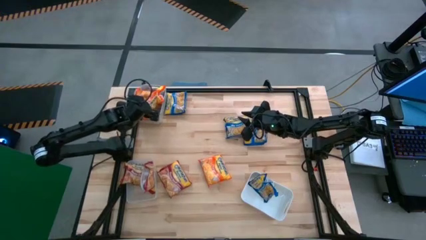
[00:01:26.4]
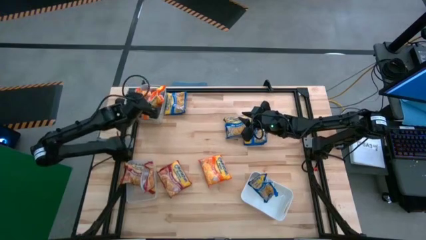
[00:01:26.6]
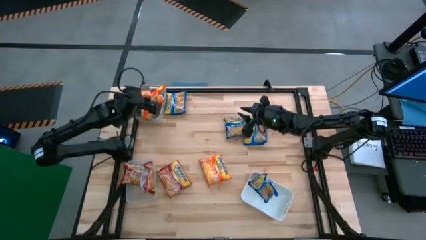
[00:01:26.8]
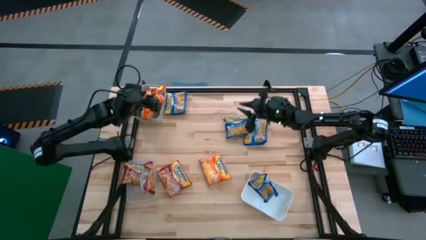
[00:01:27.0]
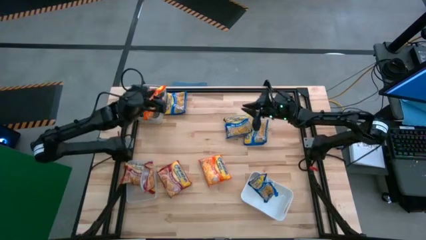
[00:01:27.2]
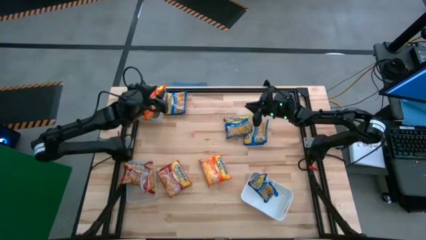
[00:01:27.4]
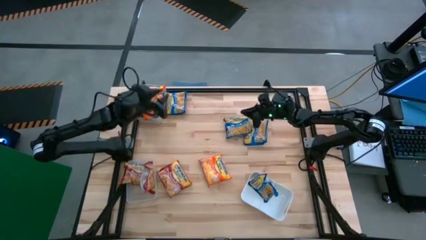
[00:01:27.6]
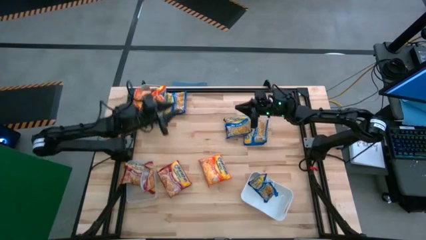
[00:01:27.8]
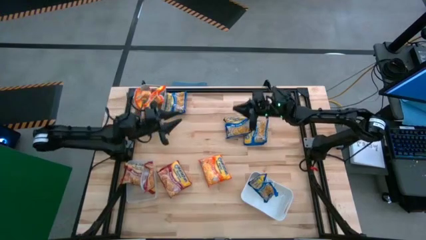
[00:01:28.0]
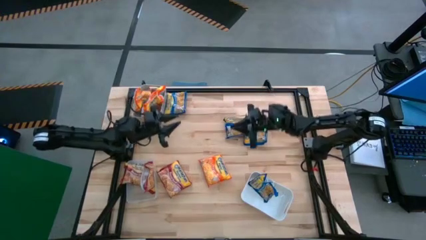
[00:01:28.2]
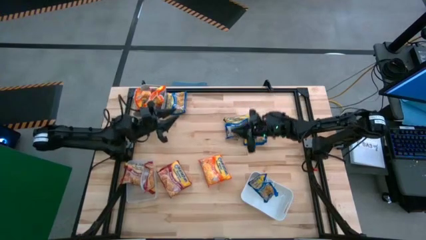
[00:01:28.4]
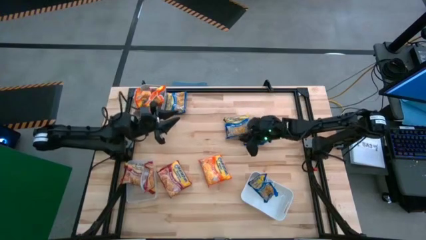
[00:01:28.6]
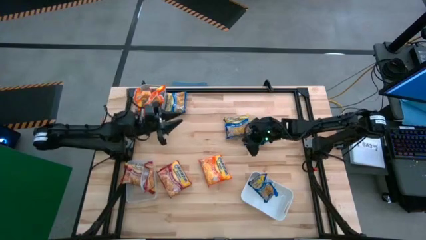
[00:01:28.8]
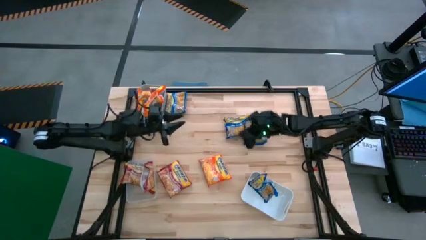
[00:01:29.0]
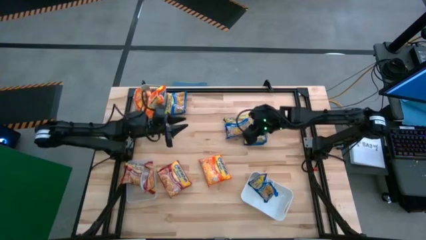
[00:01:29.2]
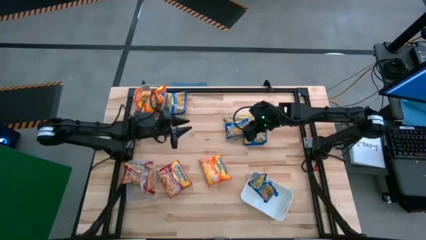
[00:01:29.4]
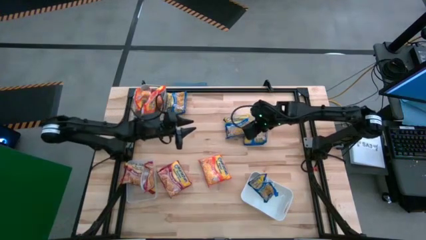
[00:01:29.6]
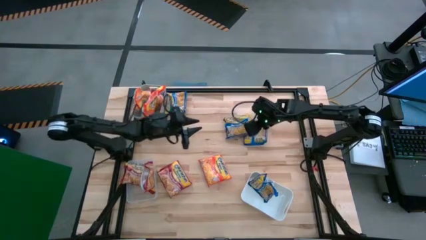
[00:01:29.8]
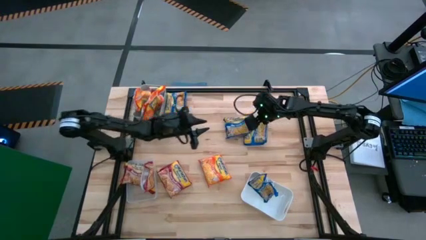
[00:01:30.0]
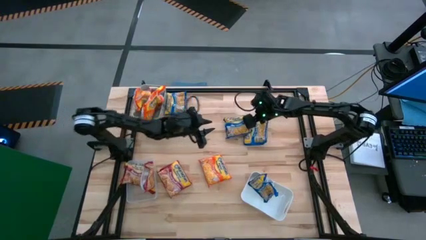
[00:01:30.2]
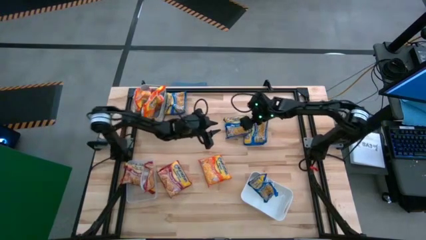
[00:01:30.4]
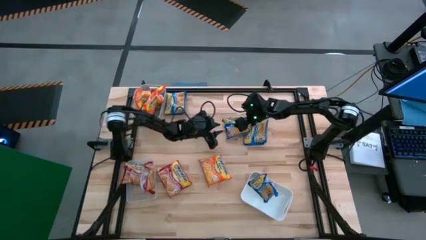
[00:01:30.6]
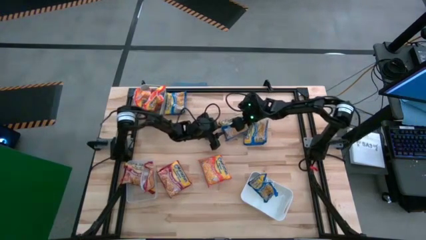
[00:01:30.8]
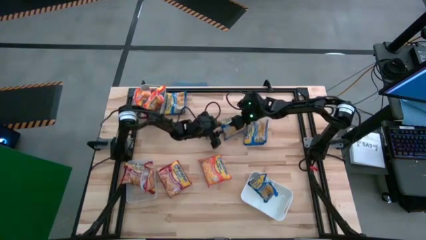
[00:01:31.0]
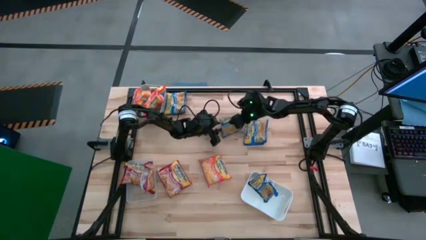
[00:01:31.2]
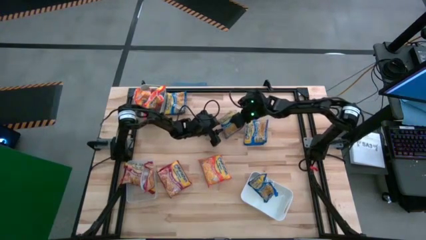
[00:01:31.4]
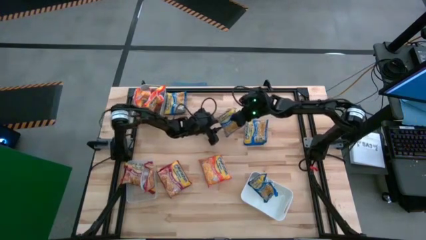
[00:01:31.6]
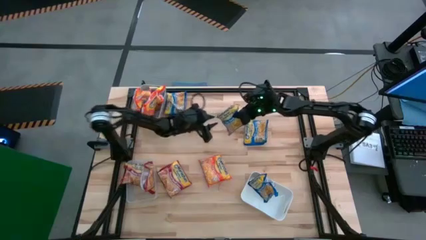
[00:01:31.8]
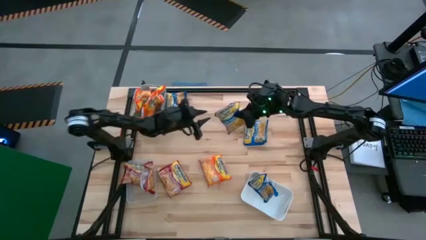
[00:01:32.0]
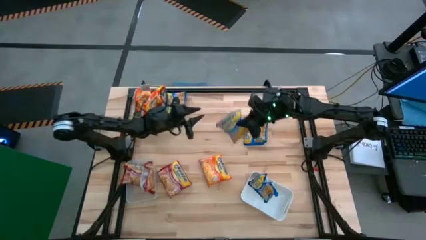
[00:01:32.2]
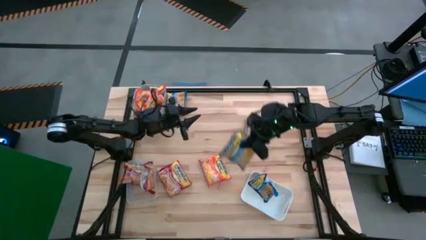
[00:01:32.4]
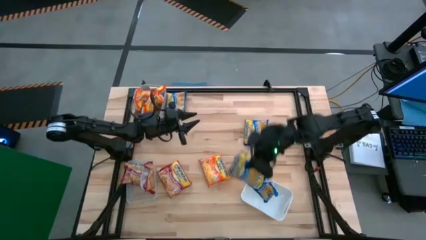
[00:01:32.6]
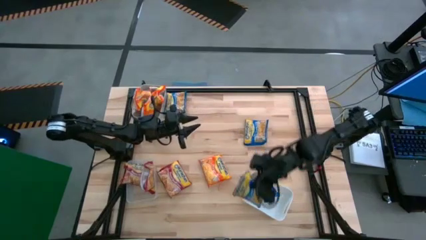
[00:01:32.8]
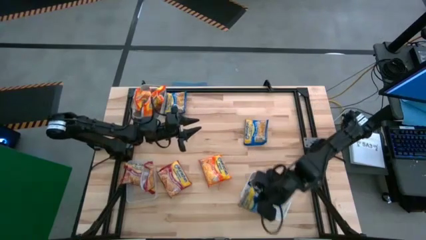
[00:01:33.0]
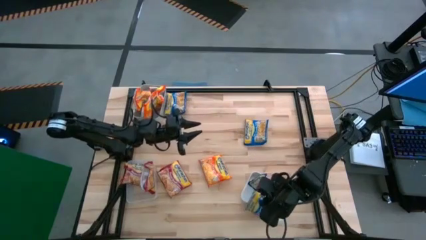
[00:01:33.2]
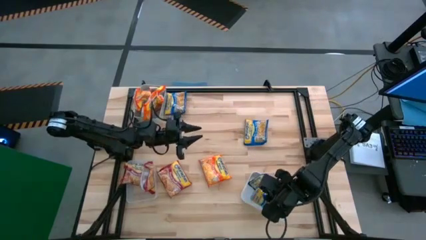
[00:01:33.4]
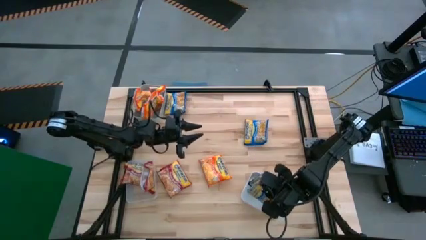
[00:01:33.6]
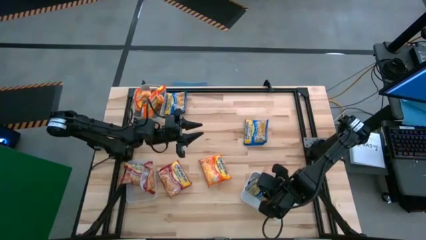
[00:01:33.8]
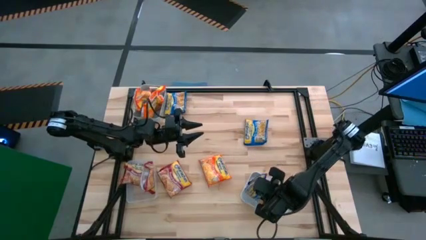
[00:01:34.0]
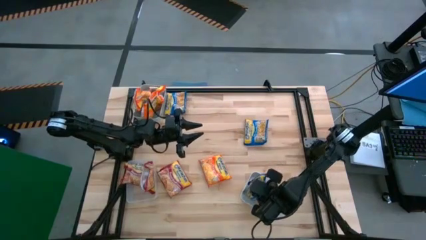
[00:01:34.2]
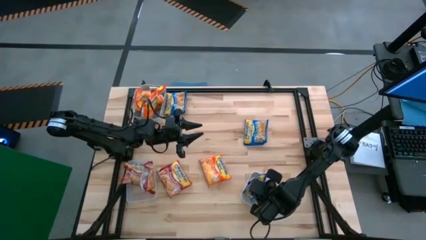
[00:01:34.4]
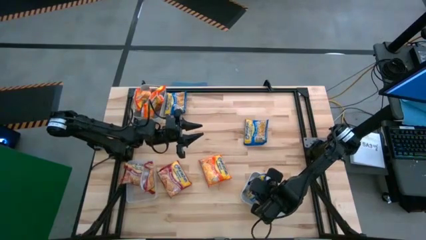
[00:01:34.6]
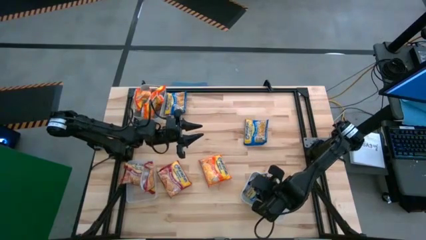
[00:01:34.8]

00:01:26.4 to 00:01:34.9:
Task: Sort Maruchan noodles
Put the blue noodle pack into the white bin

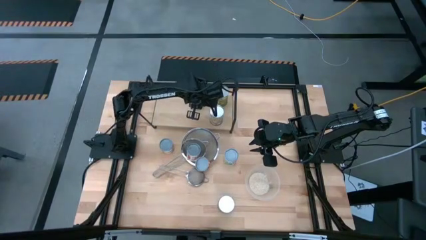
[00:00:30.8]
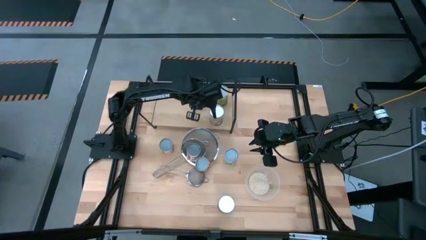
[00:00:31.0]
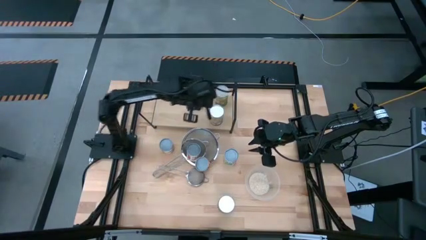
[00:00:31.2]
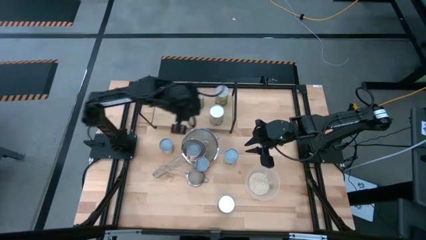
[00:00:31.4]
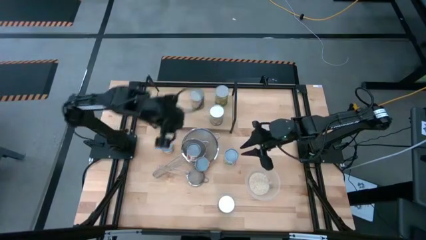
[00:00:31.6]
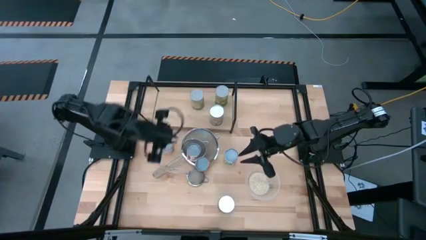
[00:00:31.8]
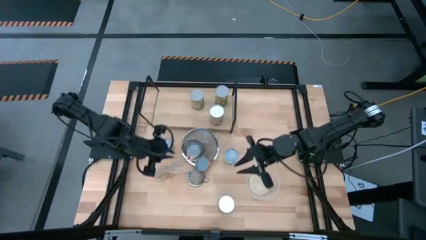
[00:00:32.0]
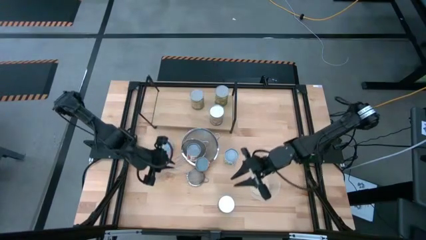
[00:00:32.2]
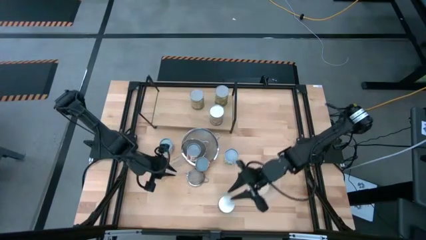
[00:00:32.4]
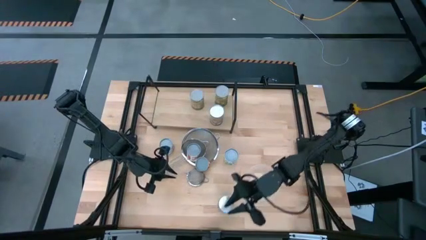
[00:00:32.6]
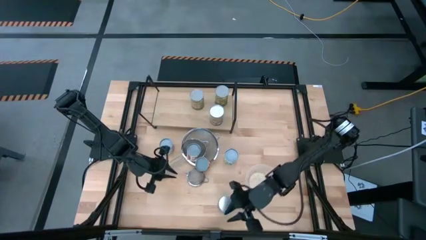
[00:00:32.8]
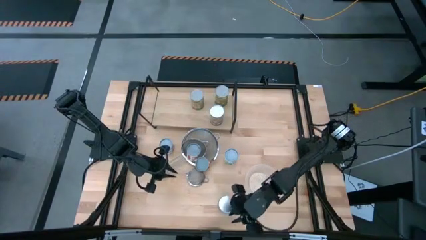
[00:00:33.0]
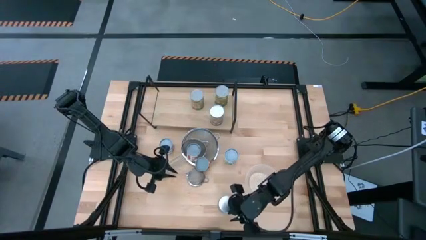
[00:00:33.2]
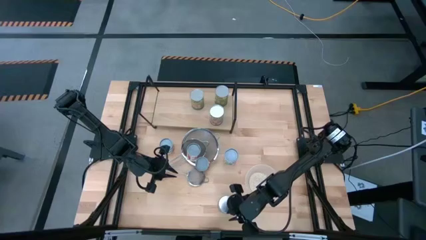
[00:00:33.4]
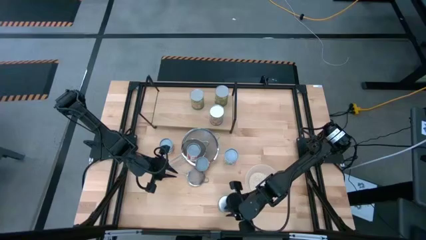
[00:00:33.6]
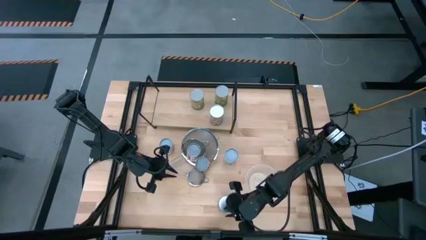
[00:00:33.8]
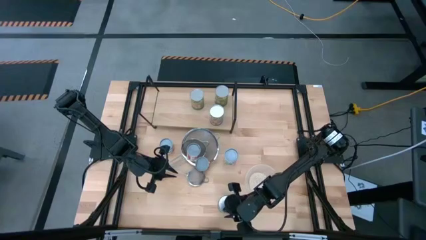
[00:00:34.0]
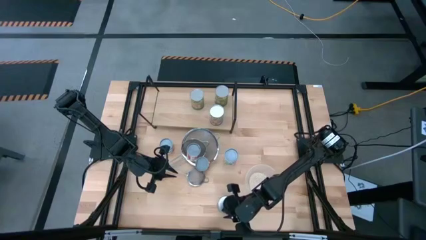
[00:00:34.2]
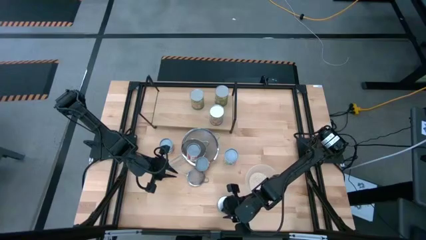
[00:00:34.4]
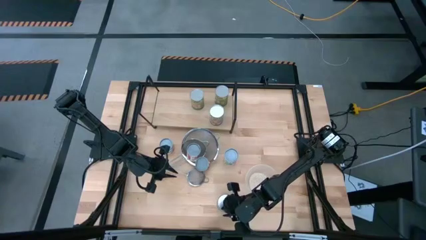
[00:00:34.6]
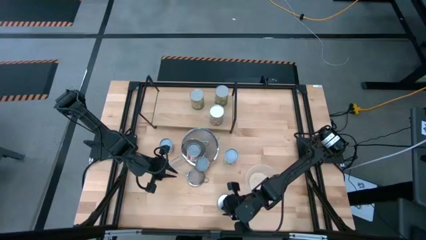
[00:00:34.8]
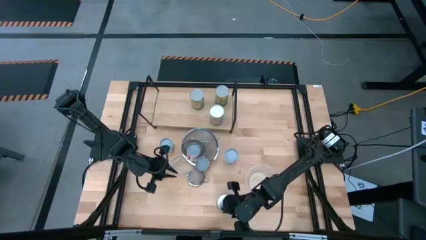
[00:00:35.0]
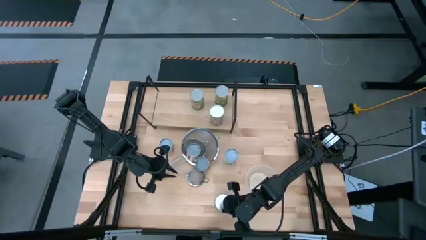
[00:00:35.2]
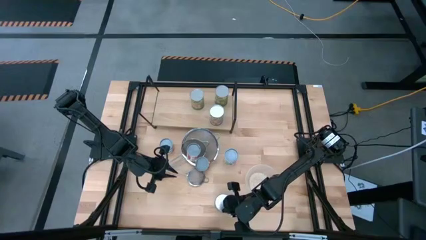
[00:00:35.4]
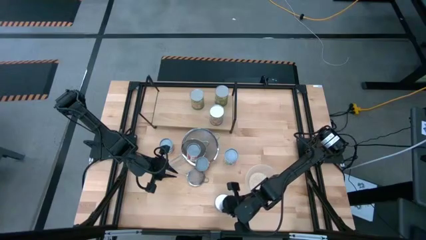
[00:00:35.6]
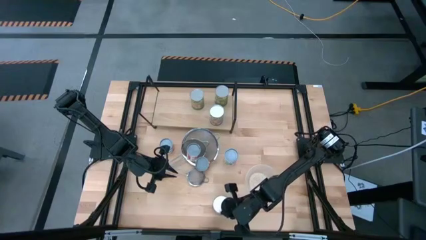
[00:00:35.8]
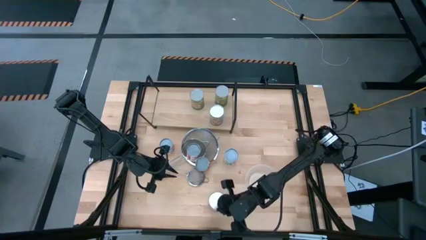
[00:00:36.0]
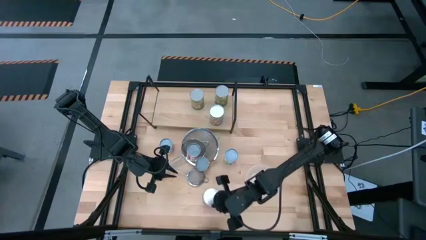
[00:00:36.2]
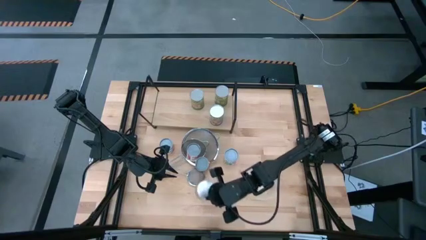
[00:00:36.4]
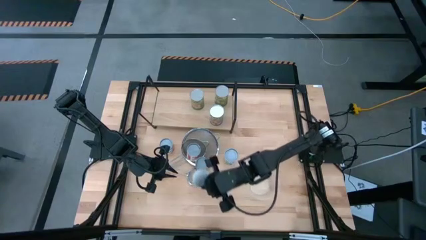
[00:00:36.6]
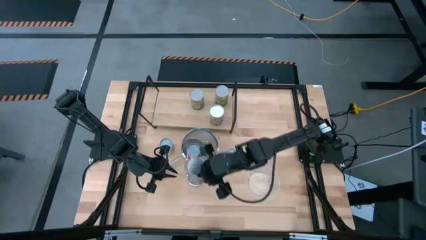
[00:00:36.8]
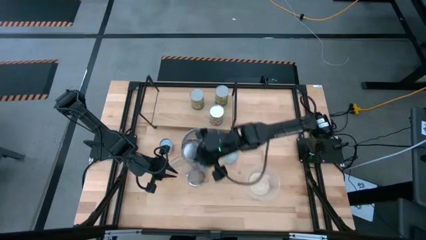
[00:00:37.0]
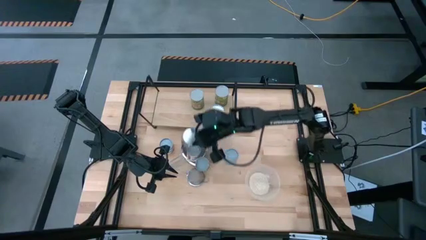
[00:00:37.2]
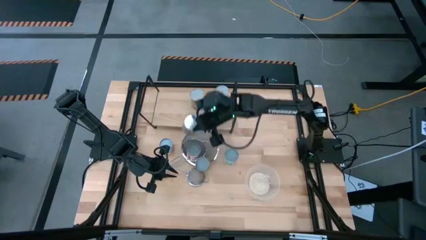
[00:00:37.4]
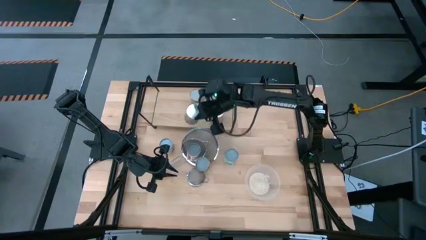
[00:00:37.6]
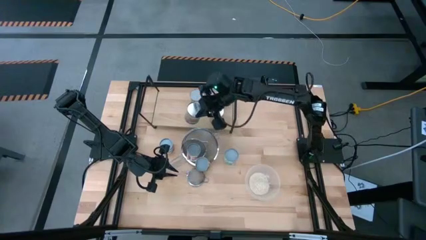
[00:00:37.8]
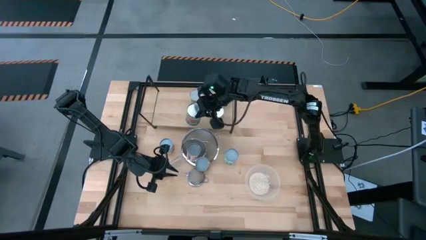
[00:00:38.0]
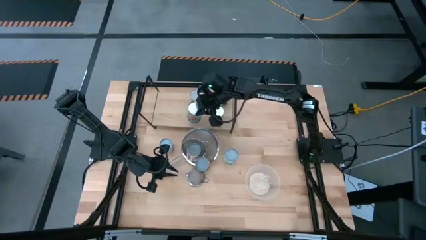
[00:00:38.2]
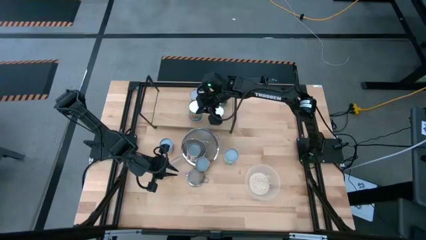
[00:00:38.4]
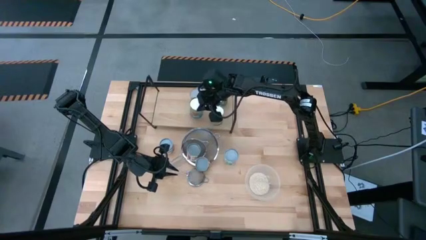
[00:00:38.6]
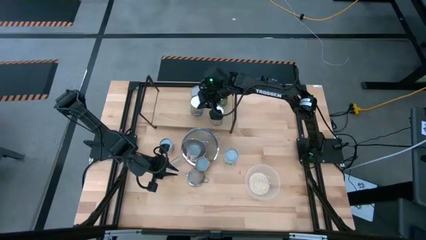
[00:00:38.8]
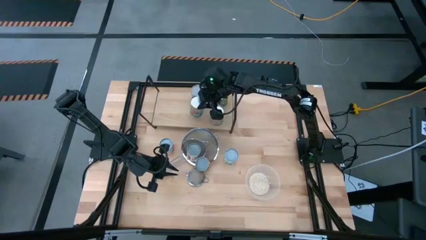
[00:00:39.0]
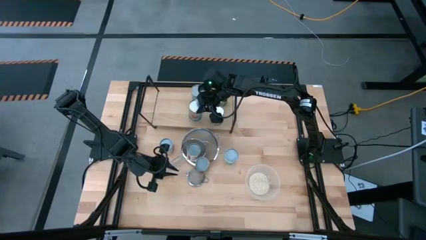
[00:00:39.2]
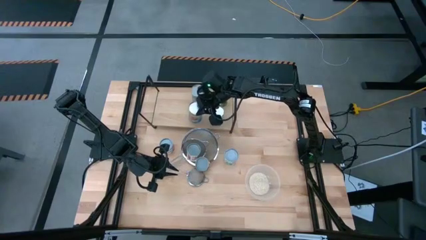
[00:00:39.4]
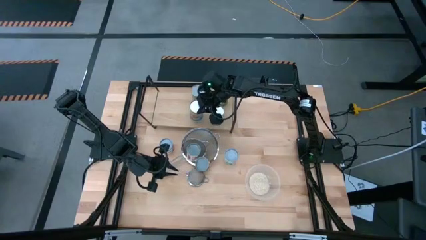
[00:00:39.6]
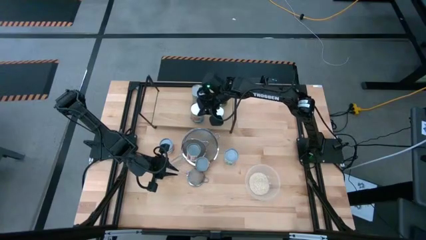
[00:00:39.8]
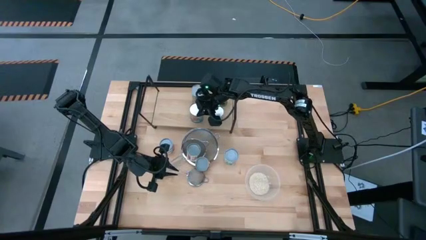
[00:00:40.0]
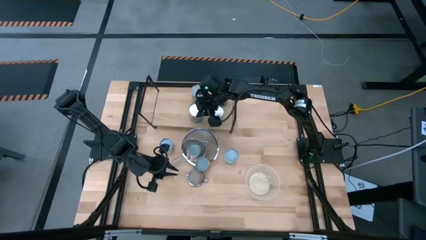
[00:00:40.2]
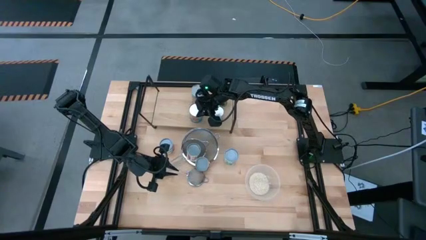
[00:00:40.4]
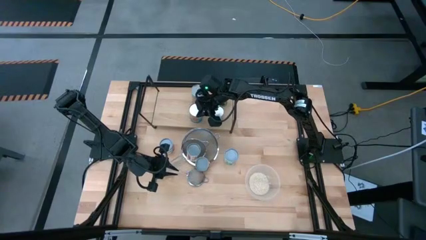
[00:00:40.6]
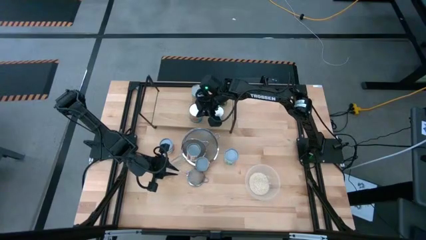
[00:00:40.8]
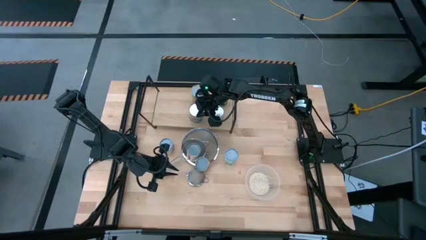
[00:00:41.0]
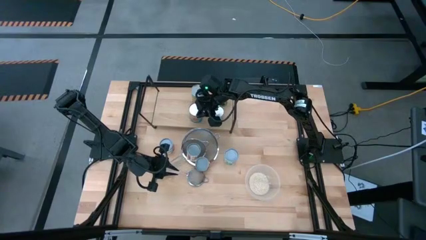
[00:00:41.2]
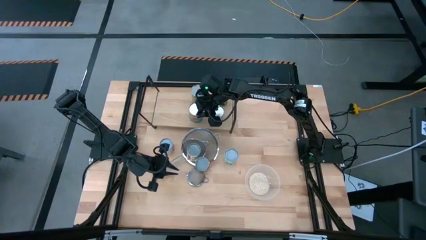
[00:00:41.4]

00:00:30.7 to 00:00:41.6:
Task: Pick and place cans onto a shelf
Put the canned tomatoes on the shelf
